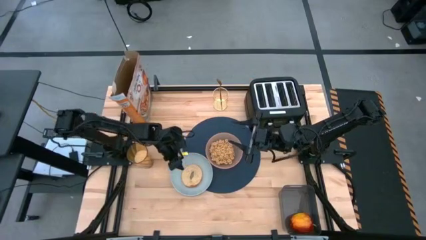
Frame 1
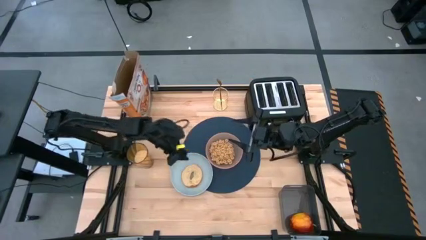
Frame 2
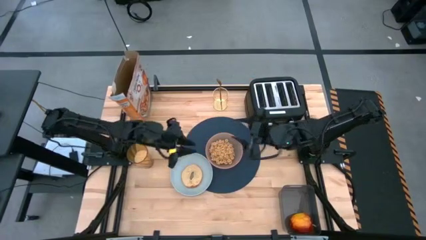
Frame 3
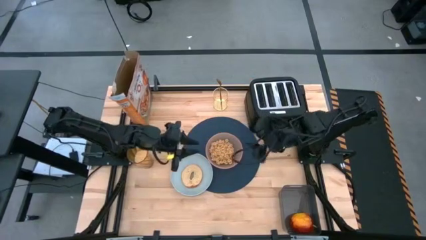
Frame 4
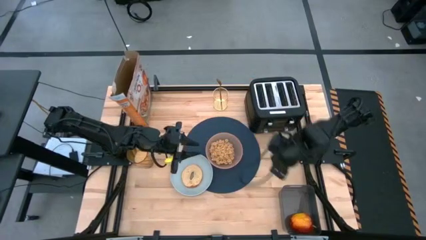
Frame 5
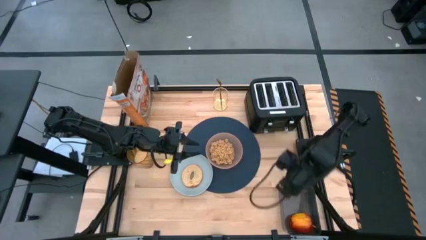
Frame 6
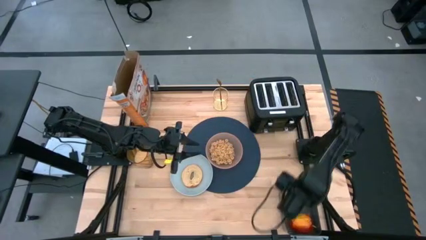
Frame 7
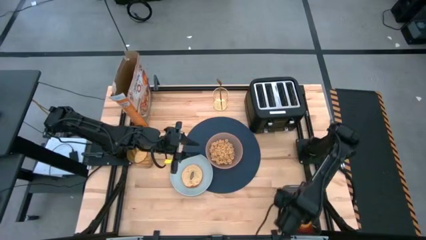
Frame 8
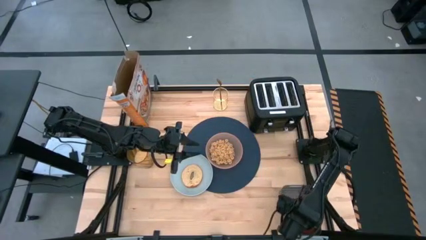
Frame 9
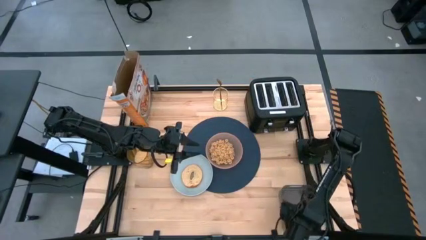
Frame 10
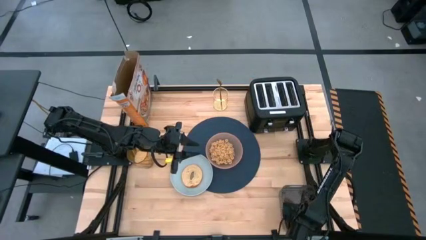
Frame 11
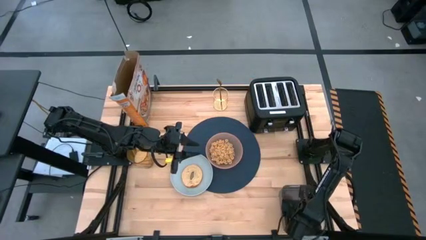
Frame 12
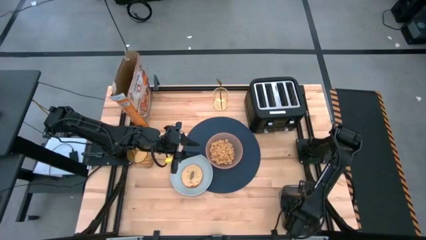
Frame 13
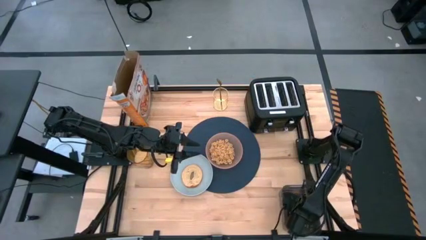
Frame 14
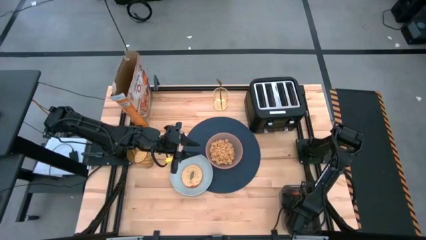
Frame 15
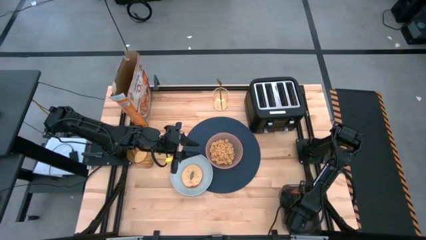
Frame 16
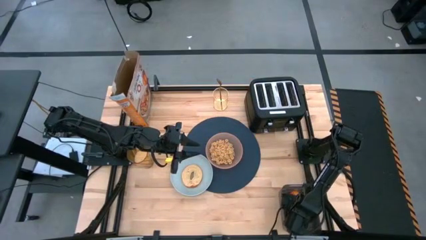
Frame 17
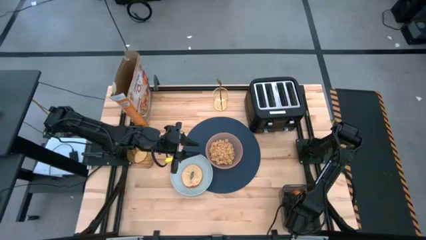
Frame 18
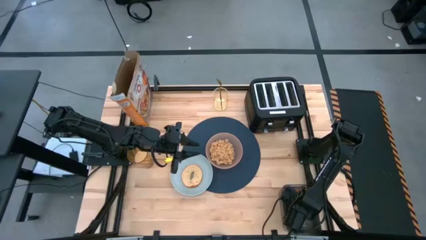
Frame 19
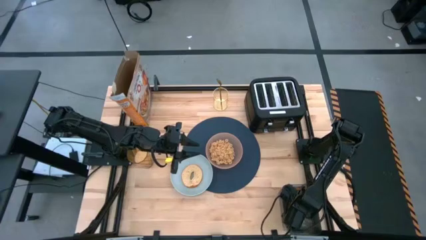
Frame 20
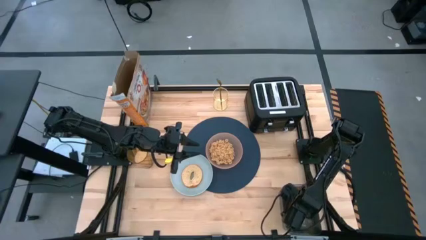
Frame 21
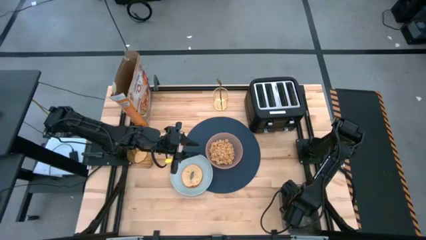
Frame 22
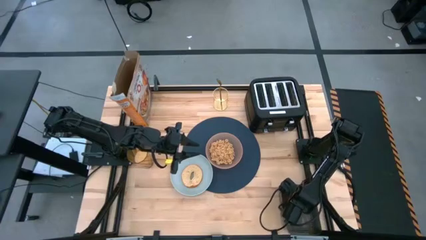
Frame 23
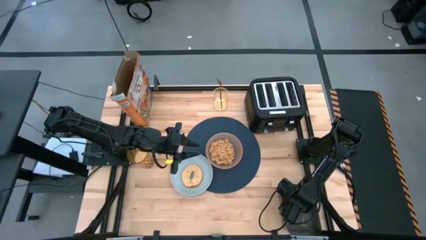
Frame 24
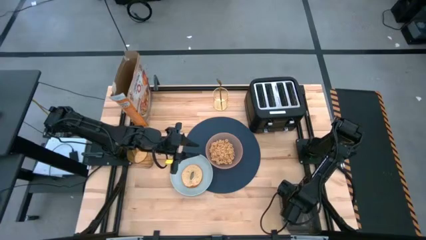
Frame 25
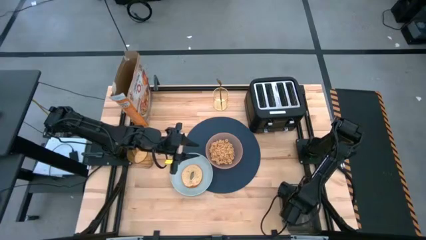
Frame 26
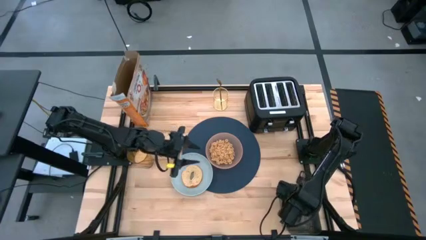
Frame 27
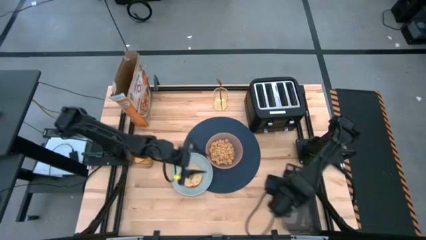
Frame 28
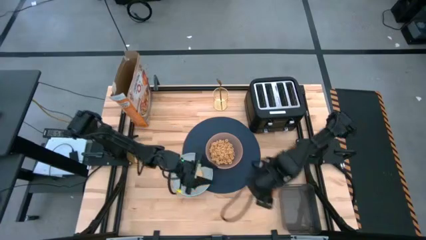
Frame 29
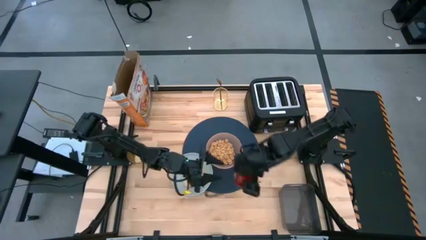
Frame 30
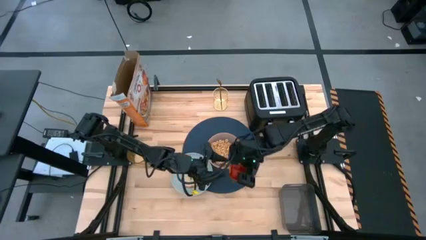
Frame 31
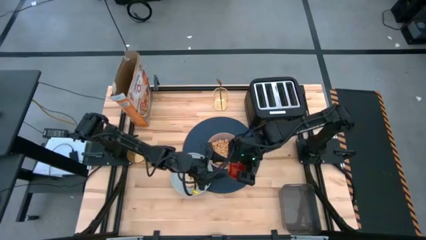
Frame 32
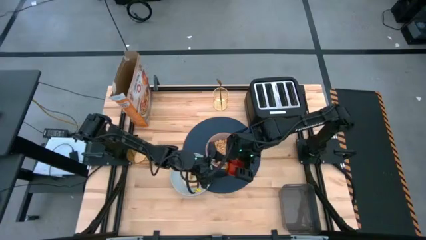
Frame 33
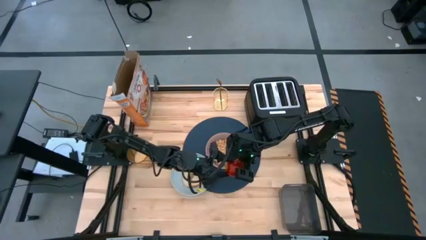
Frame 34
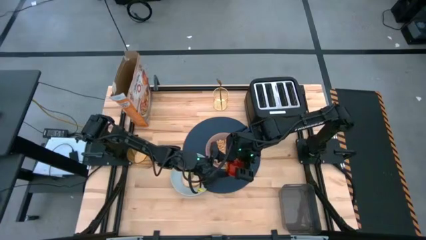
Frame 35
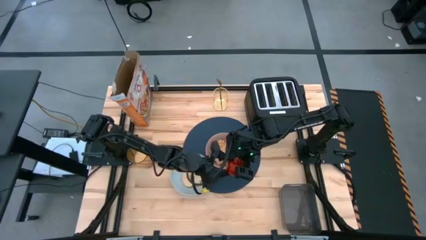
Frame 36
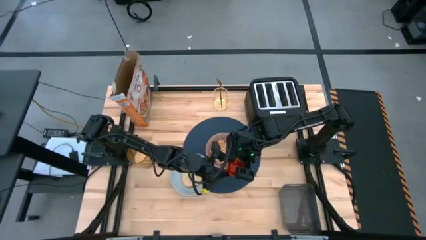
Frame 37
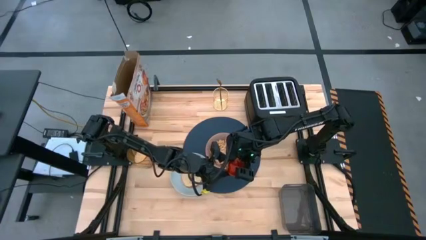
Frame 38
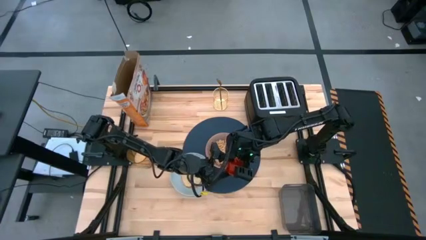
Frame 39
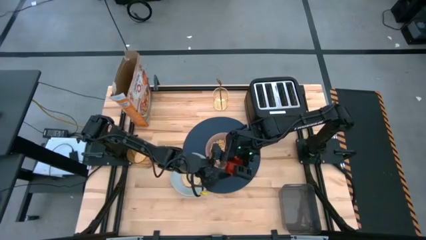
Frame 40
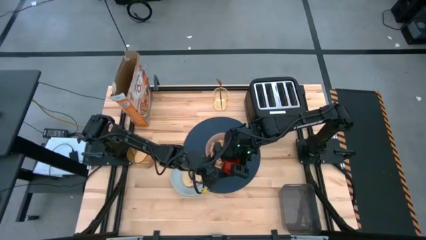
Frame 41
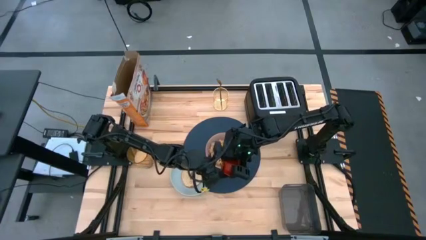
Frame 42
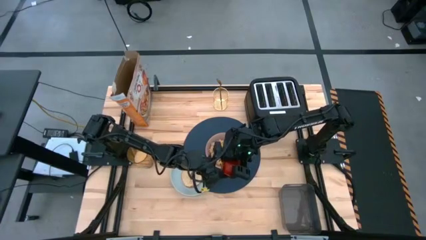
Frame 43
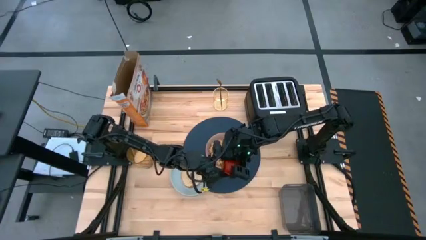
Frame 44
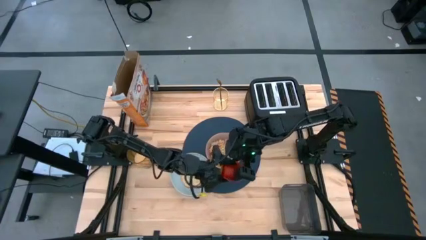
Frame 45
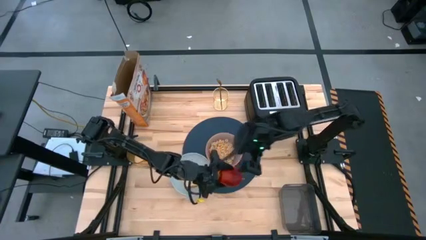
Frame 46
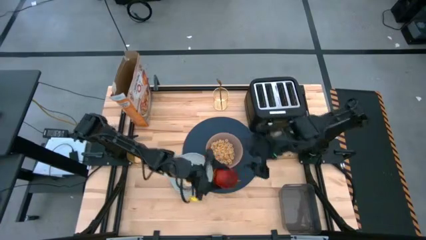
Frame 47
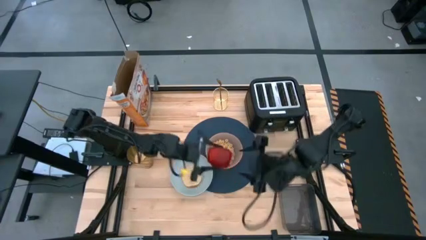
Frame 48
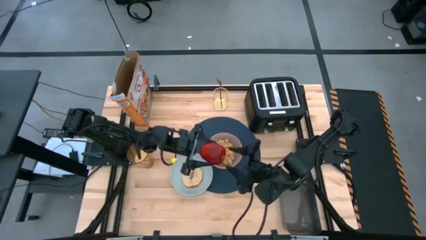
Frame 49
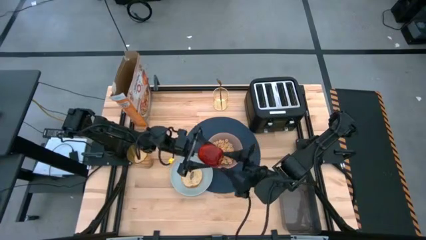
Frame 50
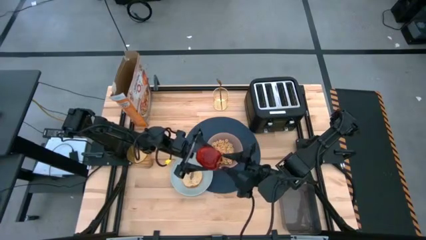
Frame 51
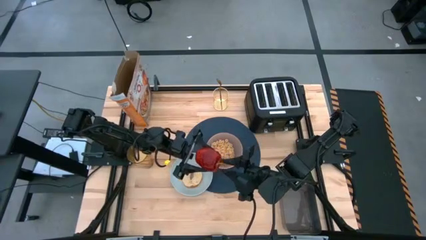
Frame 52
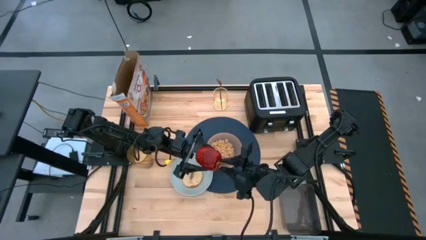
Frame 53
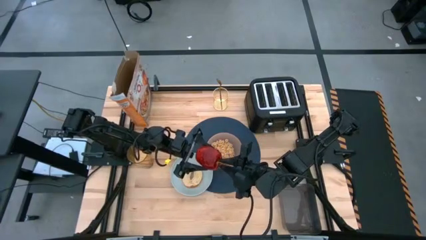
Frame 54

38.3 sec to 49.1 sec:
Task: Arrange a breakfast setting
Put the red apple on the blue table mat to the top left of the pink bowl
